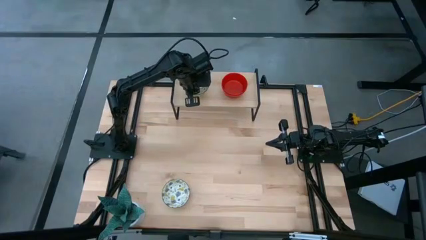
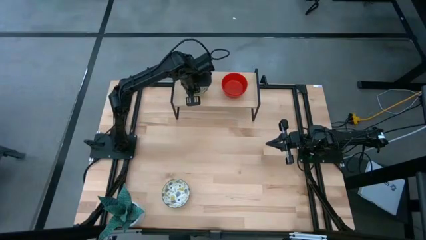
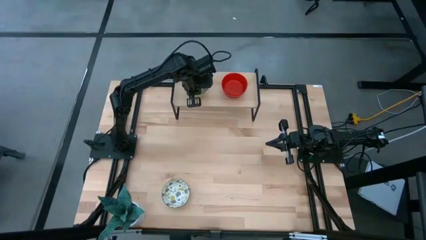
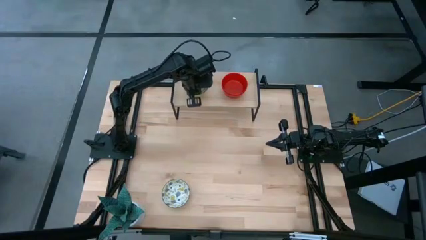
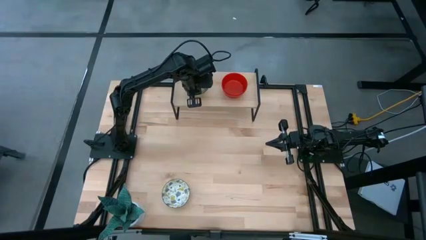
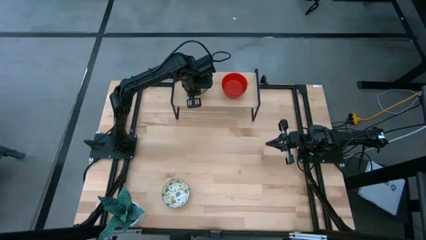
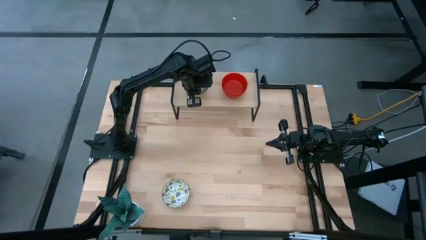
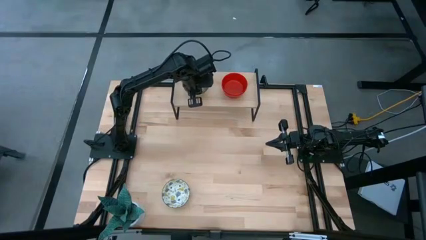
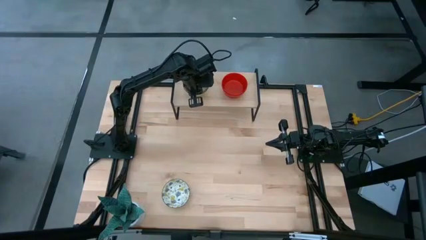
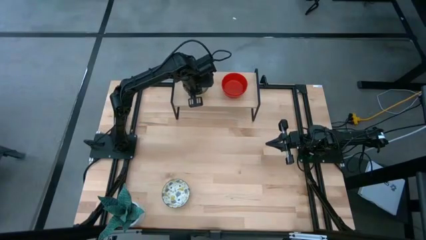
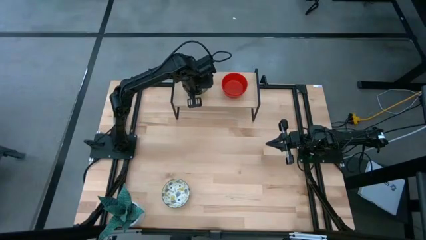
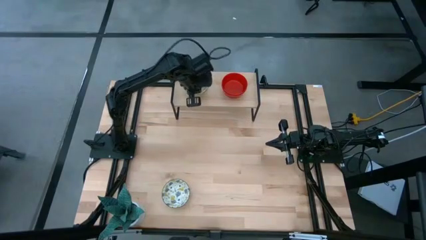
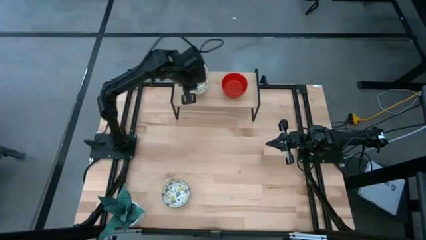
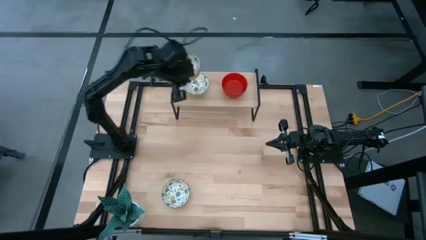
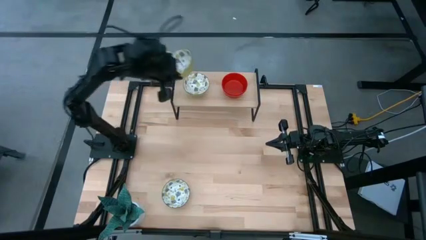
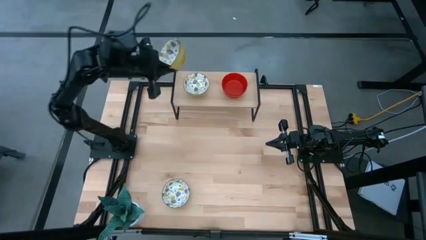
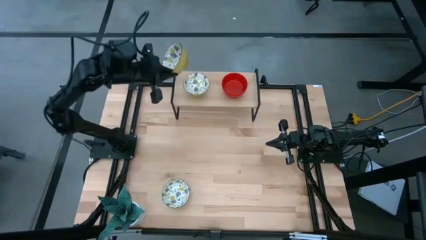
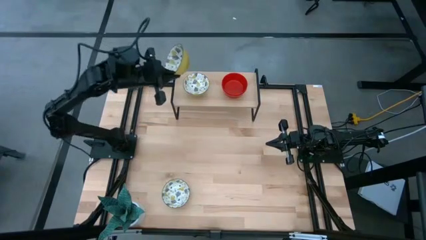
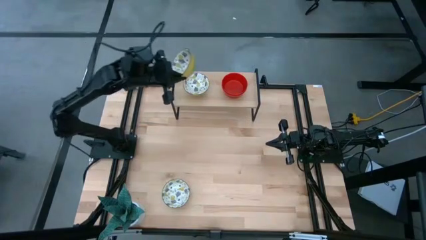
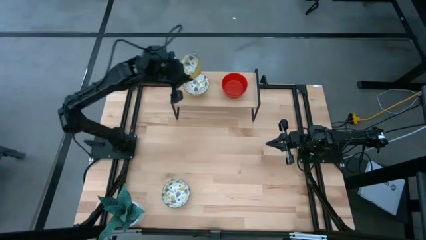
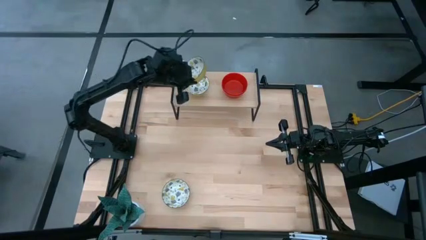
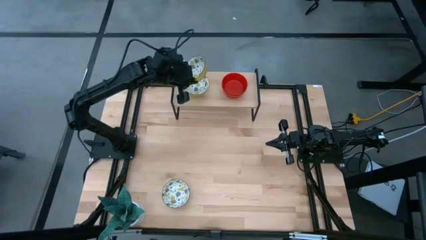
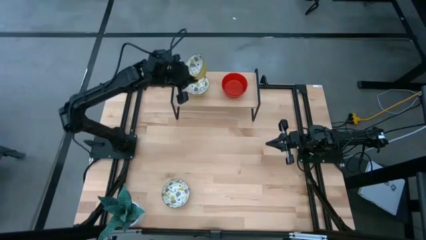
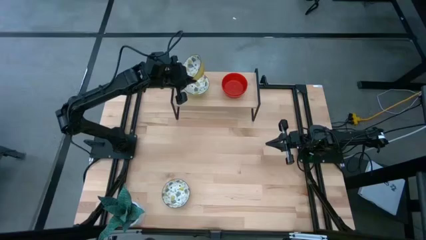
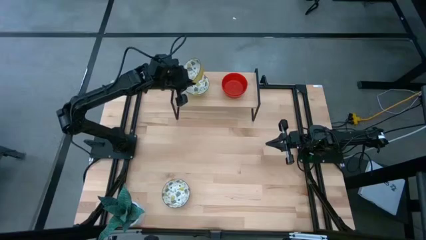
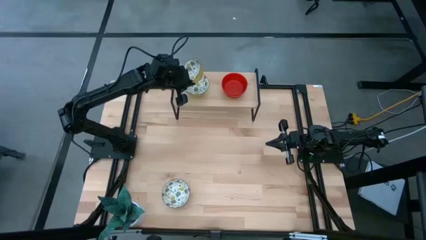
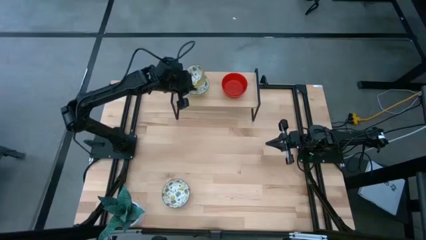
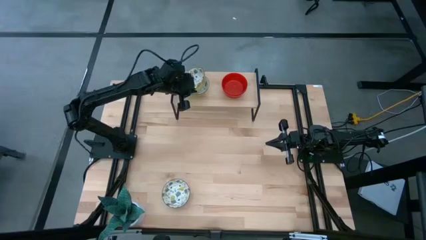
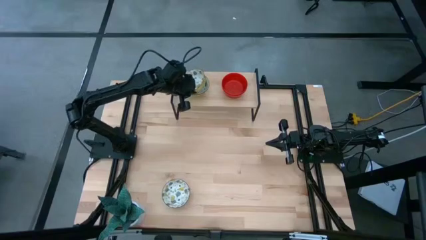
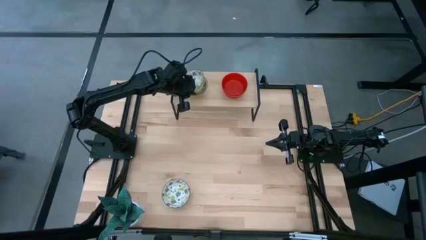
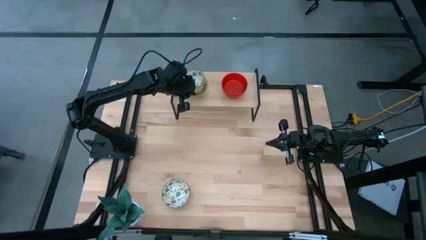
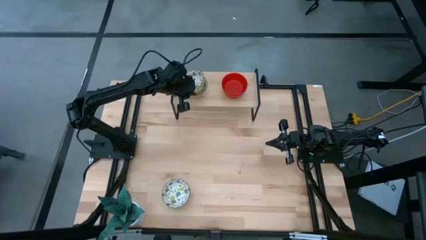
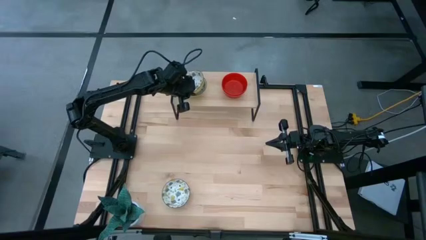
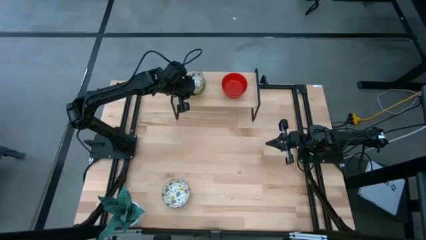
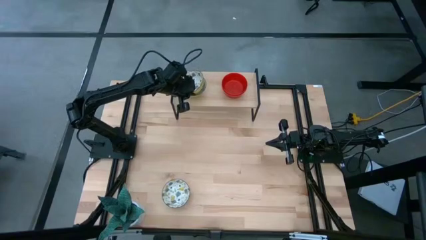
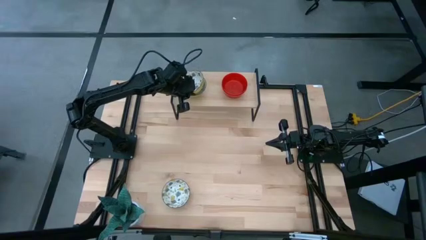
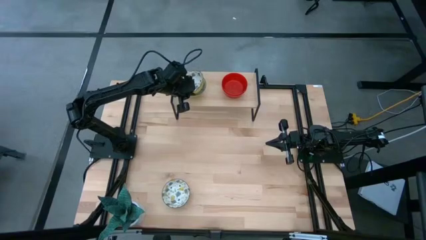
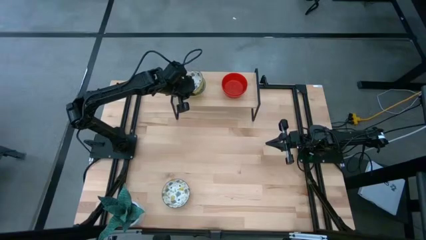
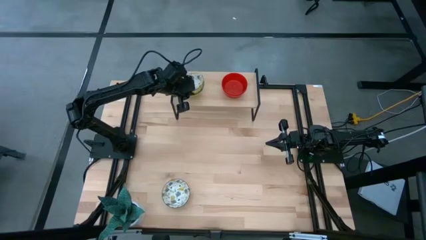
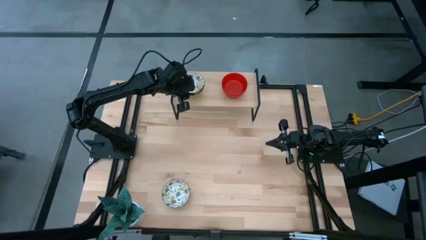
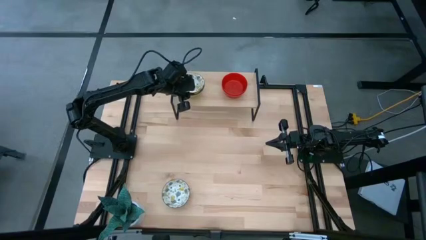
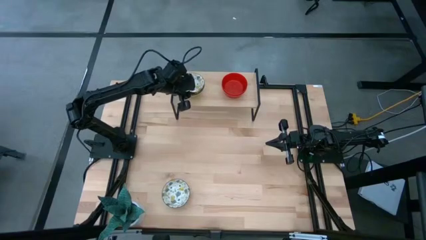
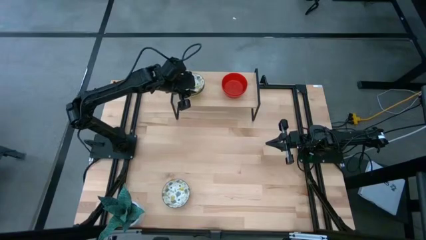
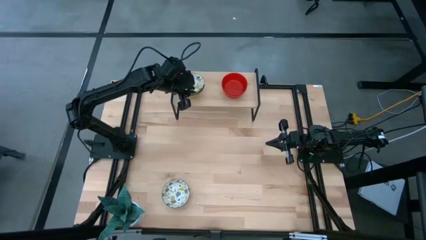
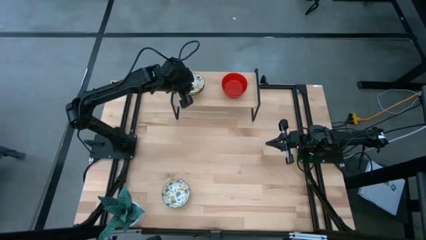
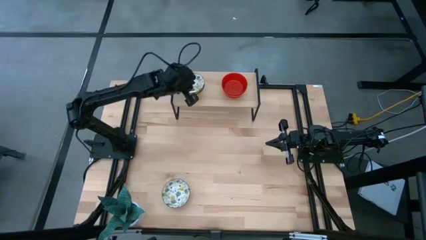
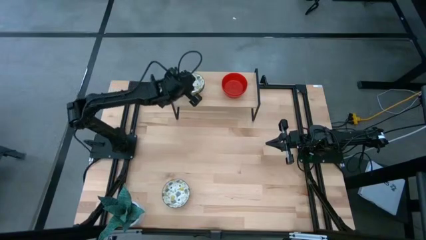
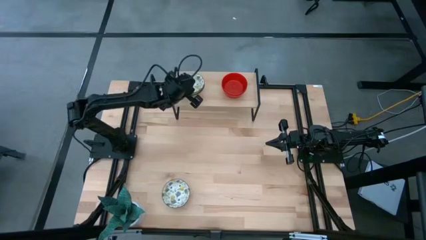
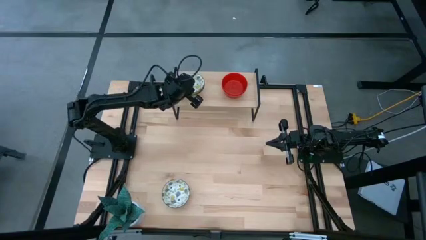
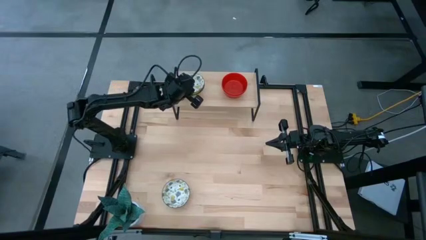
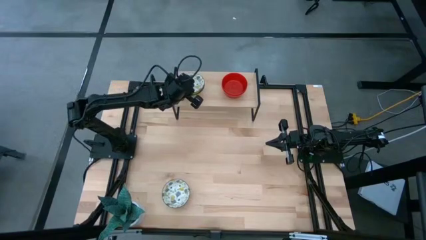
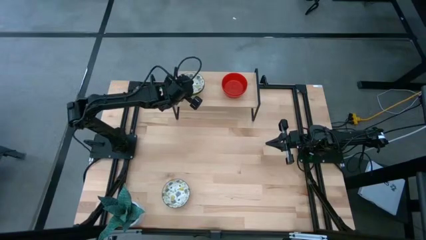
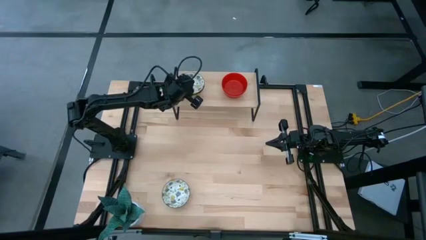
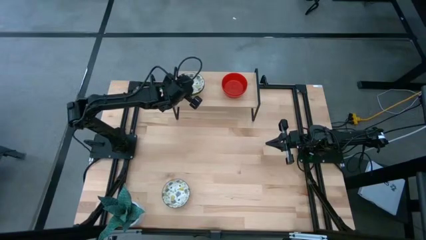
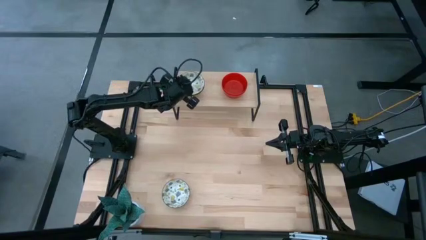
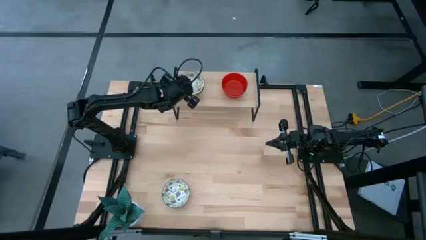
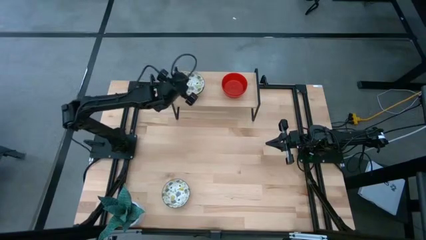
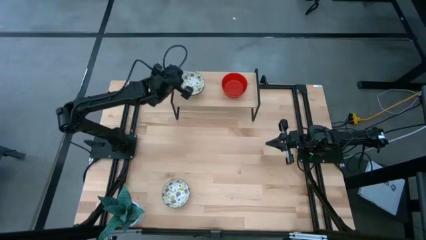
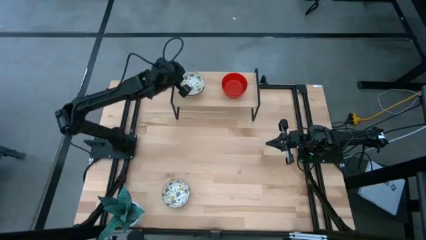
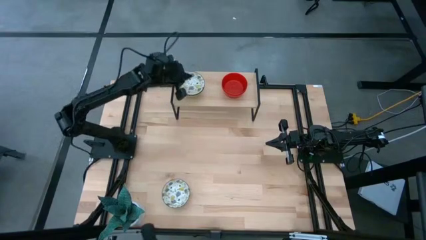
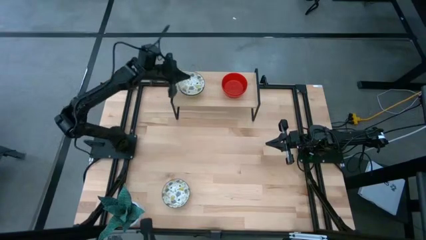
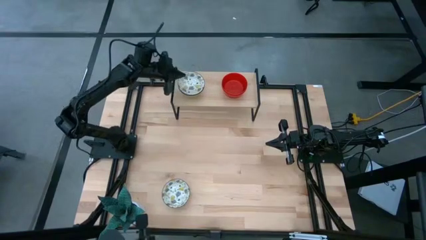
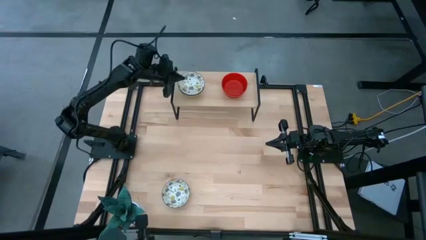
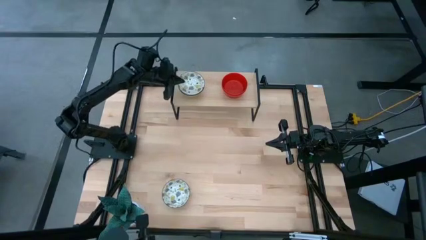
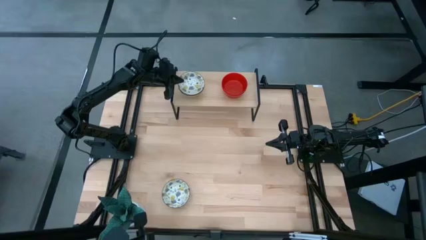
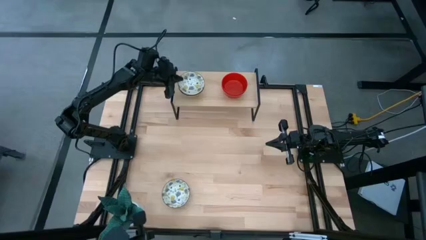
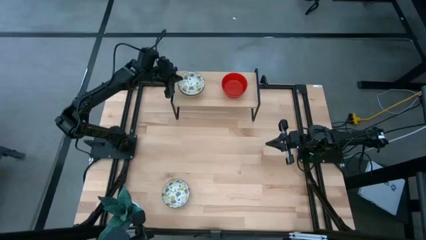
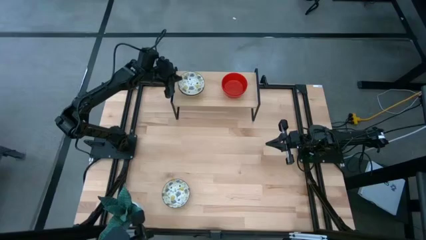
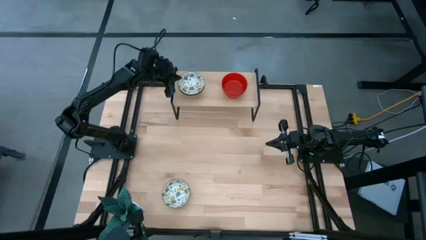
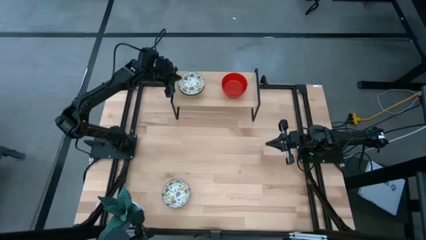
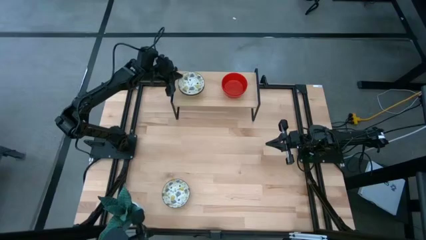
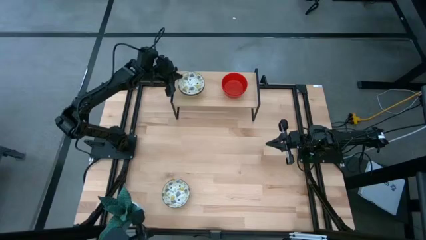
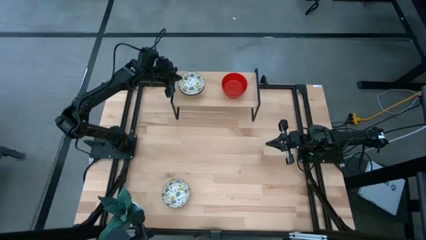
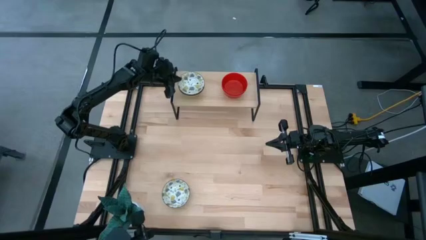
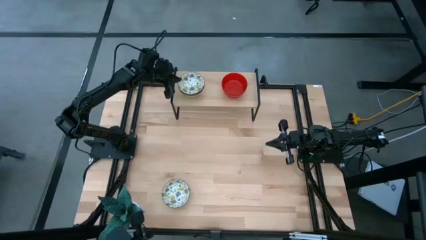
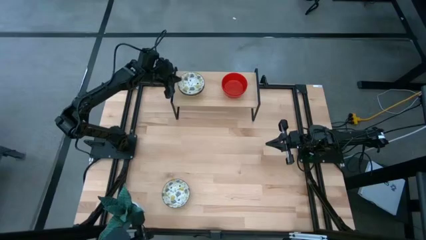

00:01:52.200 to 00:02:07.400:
Task: Pick & Place Mini bowls
Stack the right white patterned bowl on top of the white patterned bowl on the shelf
